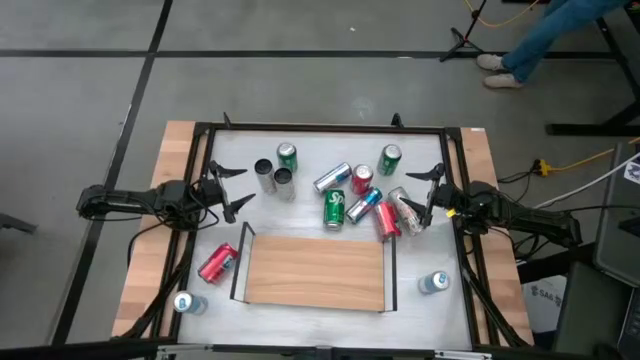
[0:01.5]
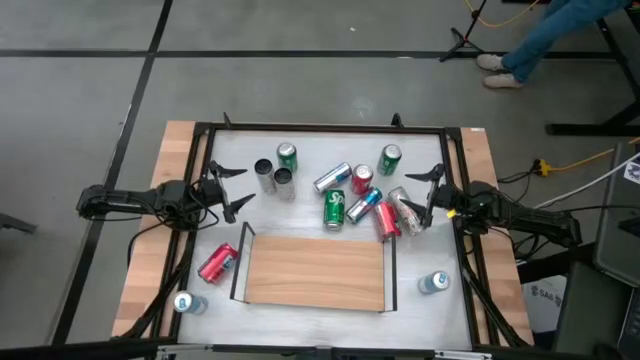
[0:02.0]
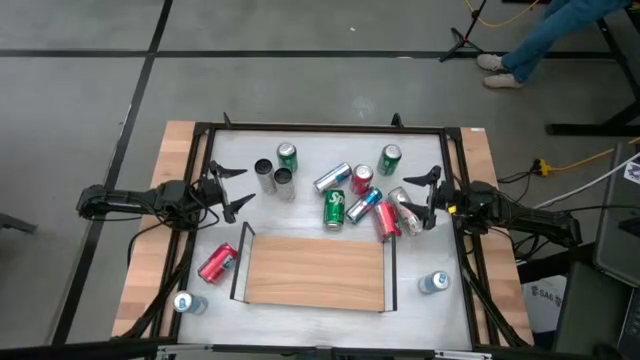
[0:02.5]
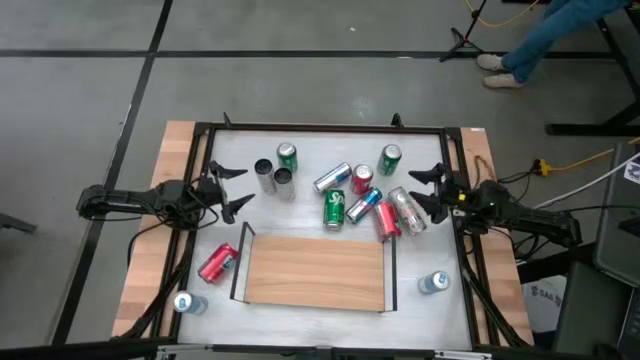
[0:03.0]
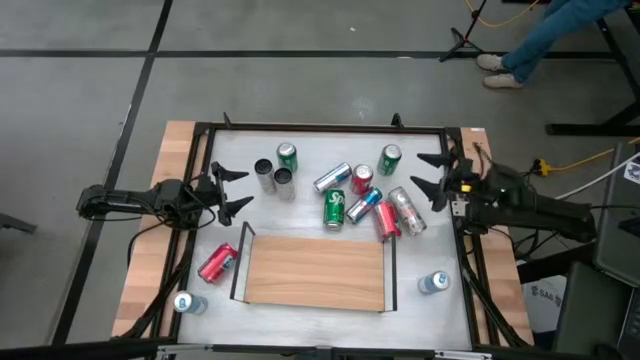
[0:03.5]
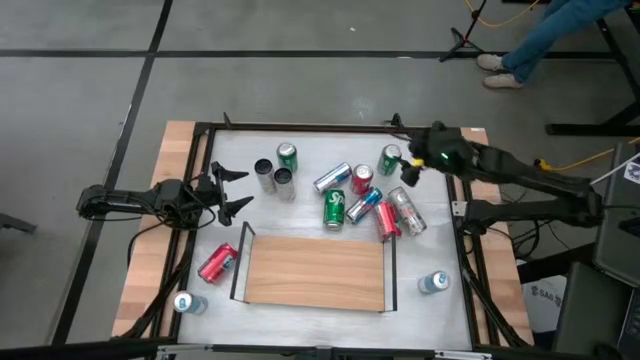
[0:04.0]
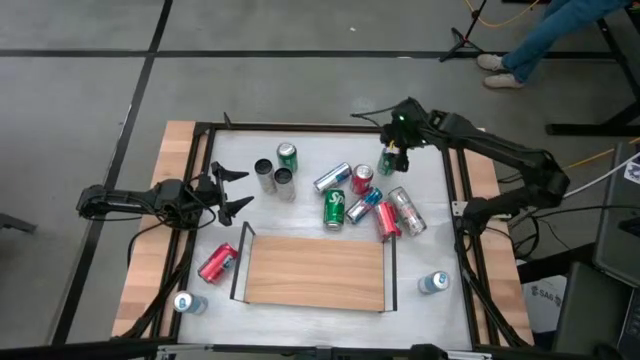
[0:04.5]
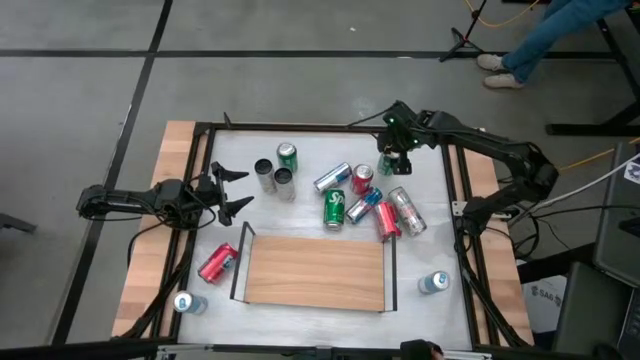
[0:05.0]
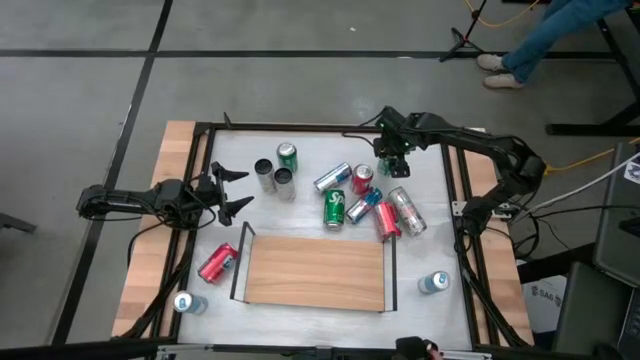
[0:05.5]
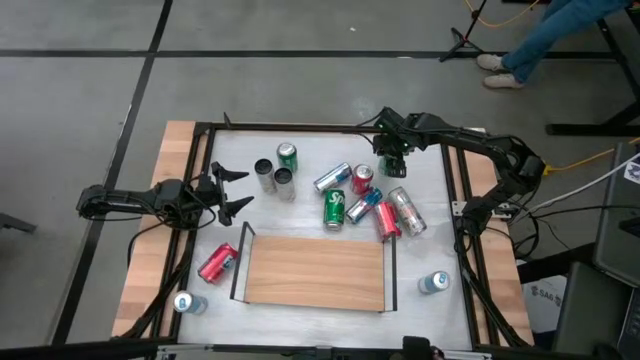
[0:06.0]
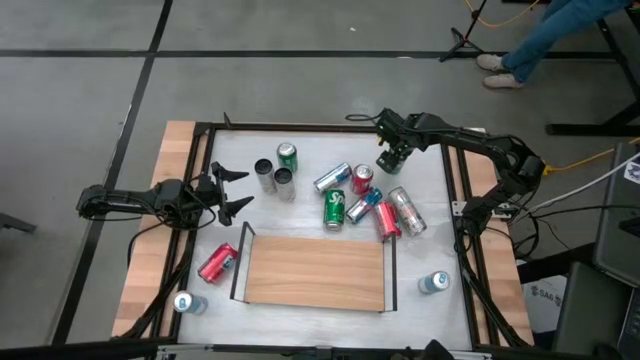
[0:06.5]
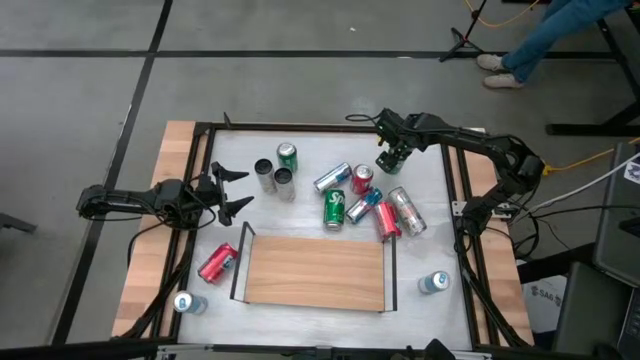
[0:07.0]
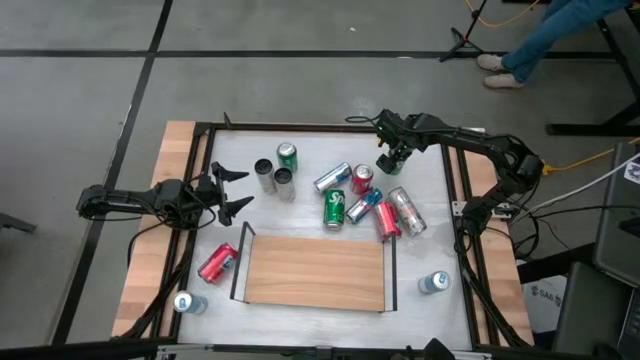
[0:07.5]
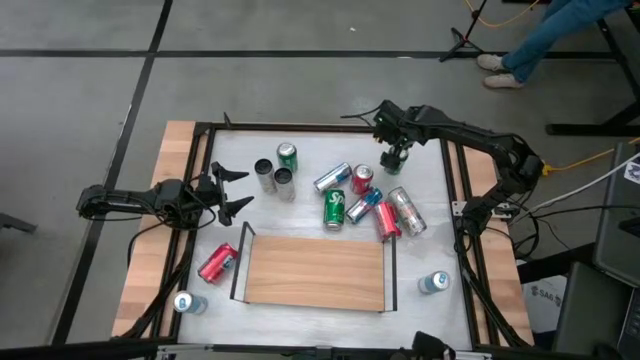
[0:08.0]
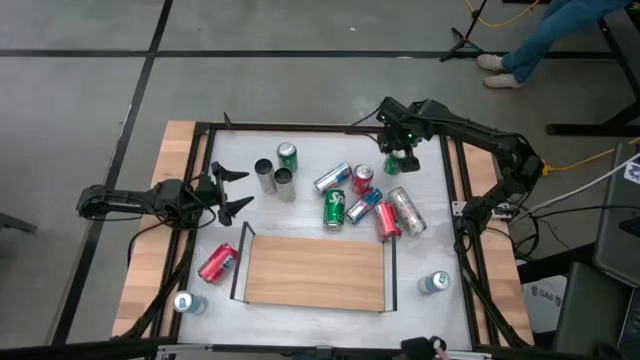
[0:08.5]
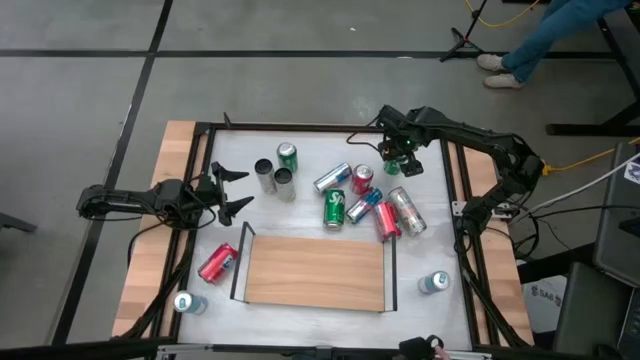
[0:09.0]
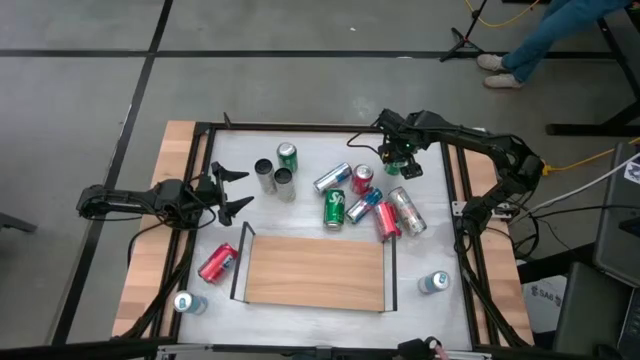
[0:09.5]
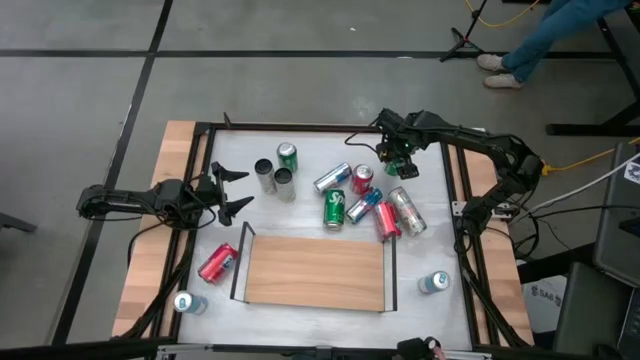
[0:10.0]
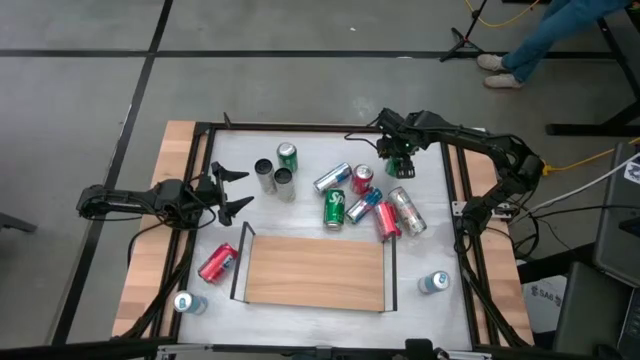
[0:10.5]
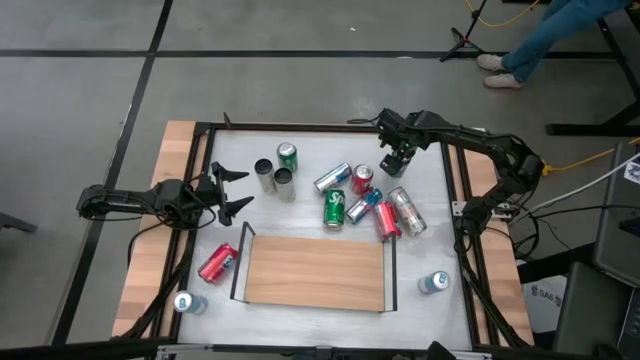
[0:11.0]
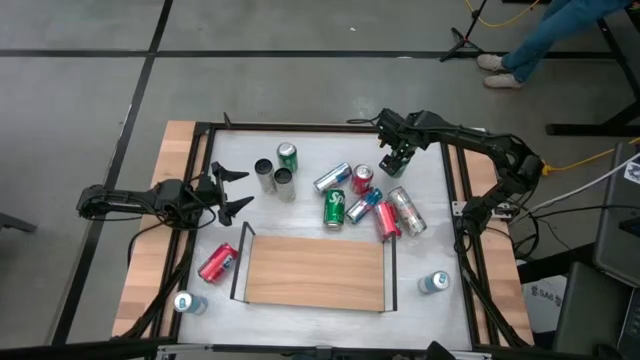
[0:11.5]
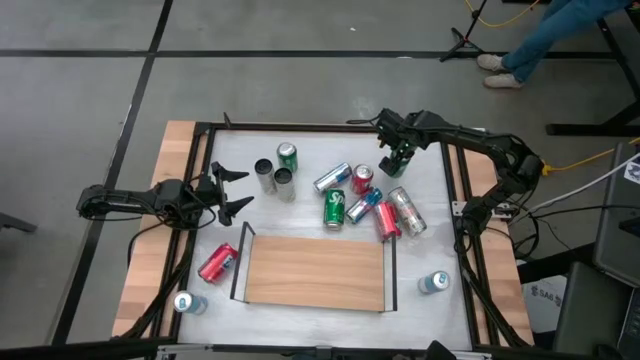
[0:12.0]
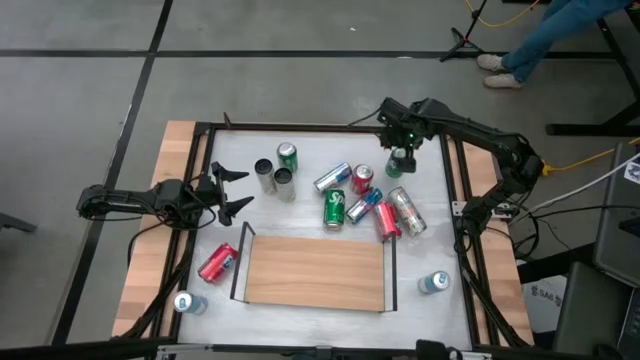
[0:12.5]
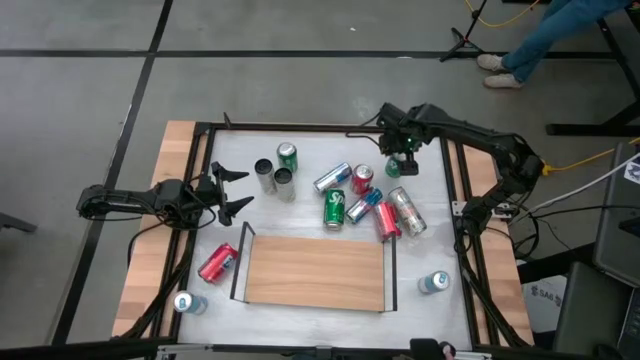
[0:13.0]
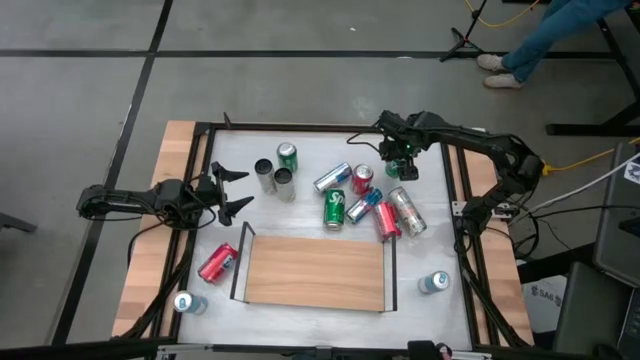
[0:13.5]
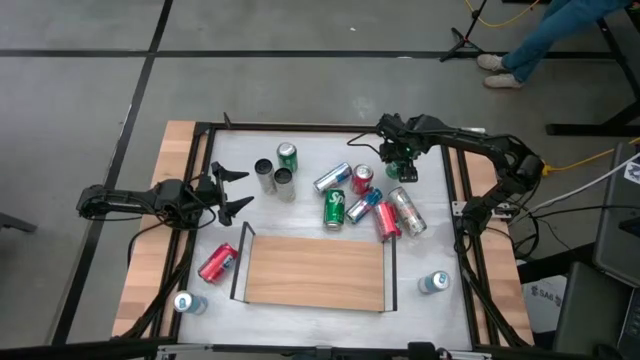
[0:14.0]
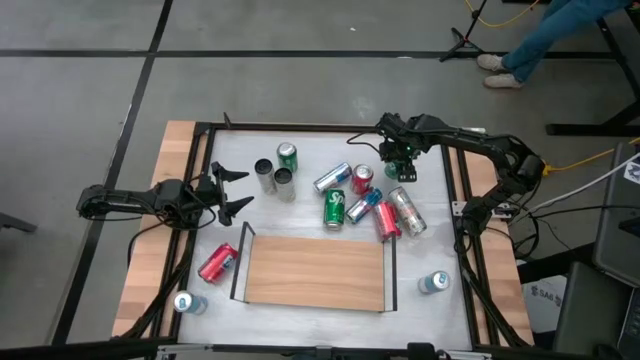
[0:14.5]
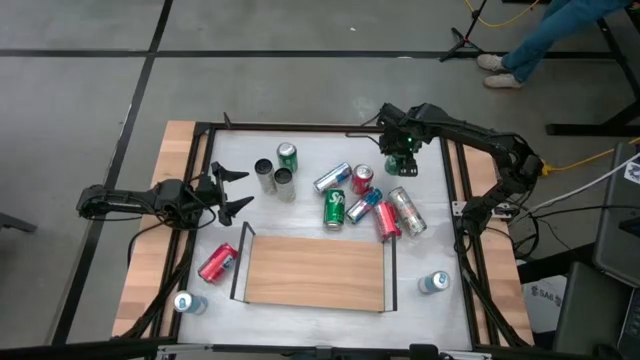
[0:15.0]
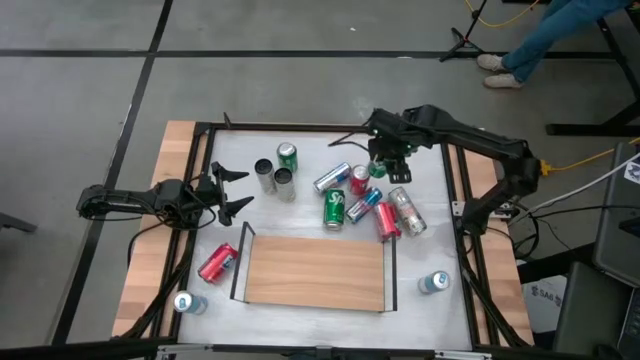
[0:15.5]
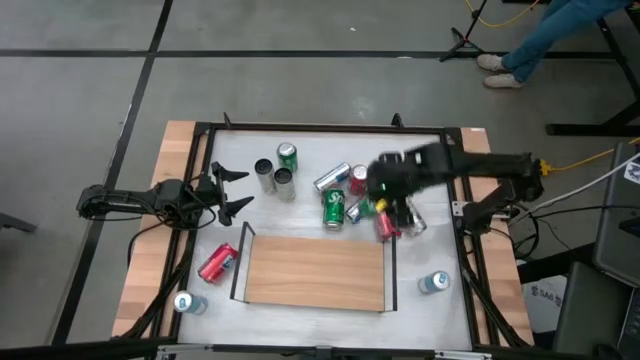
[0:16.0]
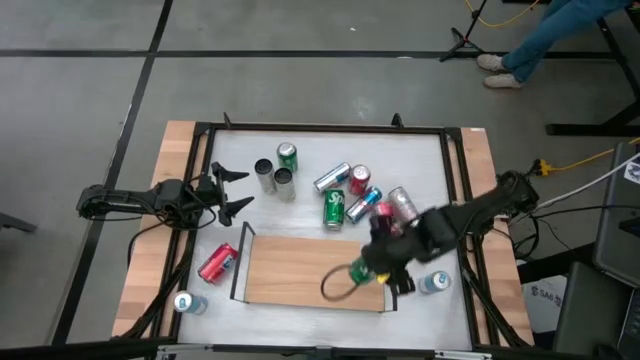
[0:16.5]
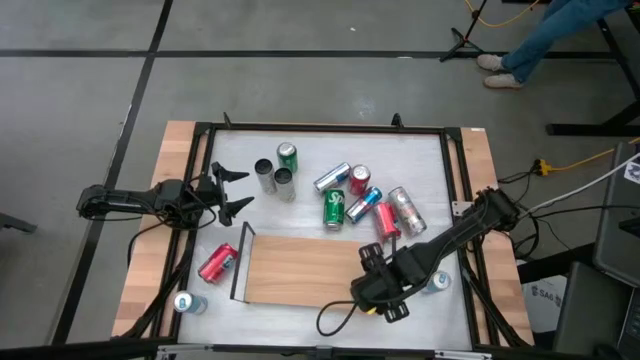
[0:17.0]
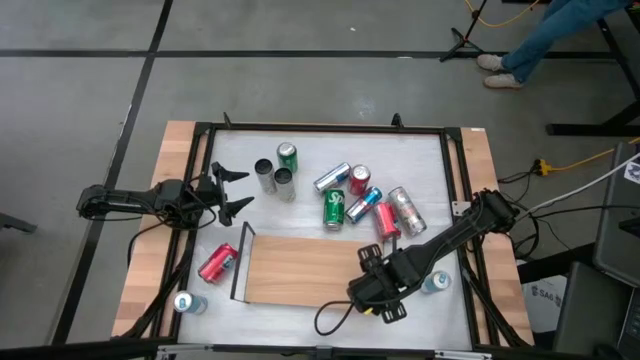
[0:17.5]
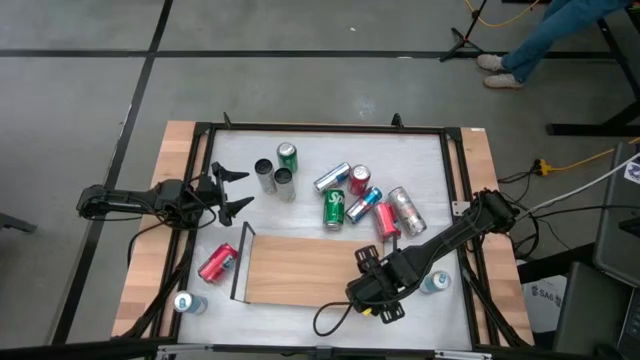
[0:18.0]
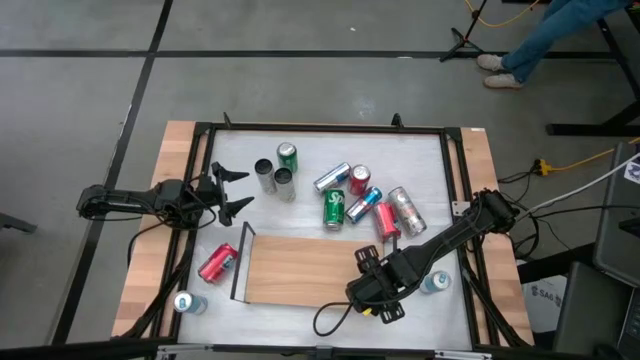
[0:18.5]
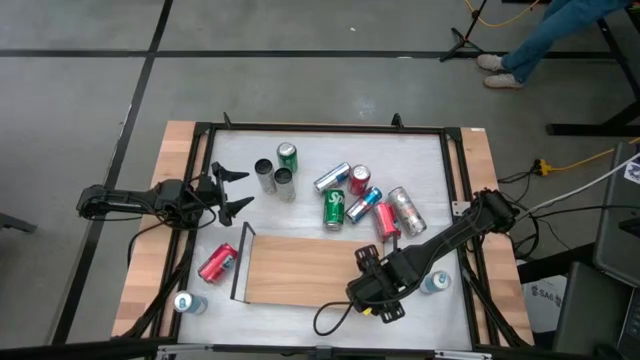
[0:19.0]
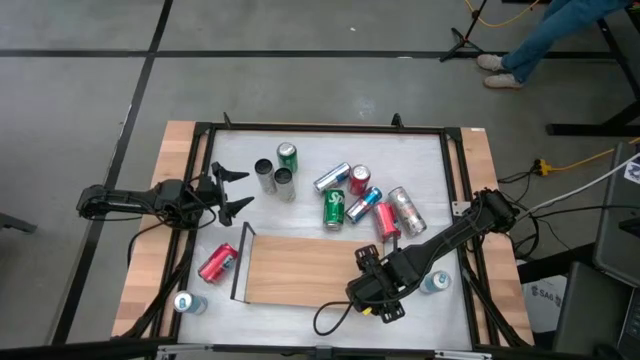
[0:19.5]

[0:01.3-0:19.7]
Task: Place canned beverage on shelf
Put the top right green soda can on the shelf

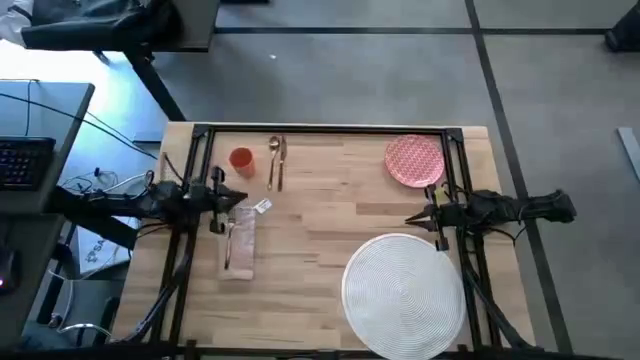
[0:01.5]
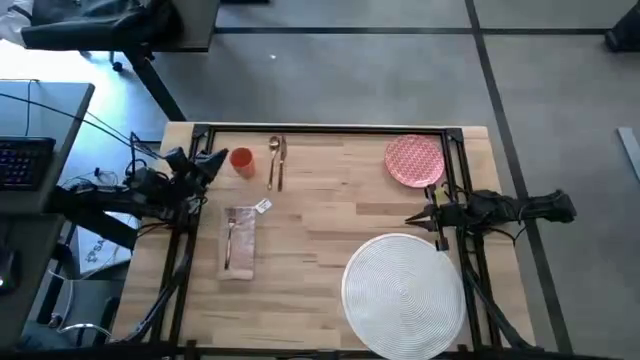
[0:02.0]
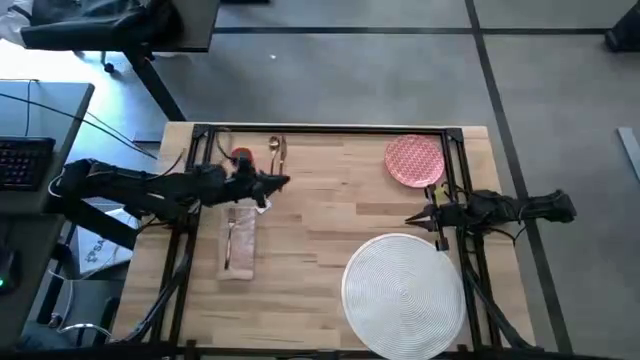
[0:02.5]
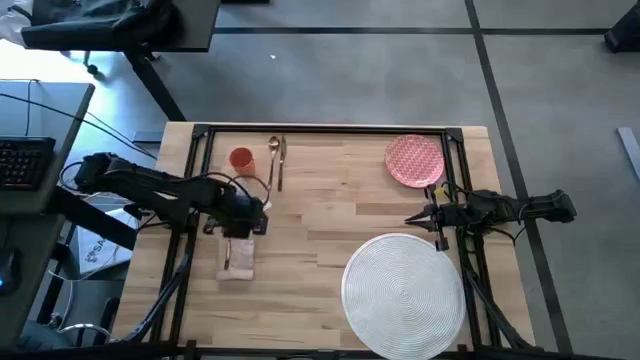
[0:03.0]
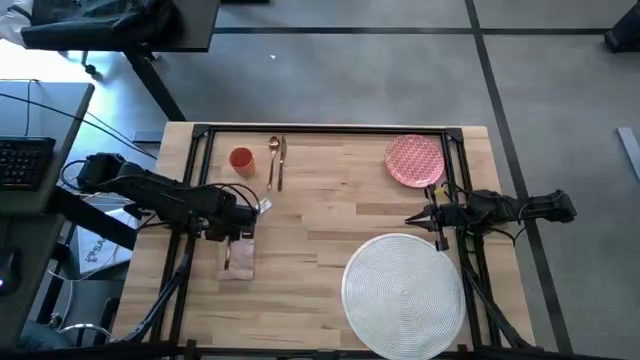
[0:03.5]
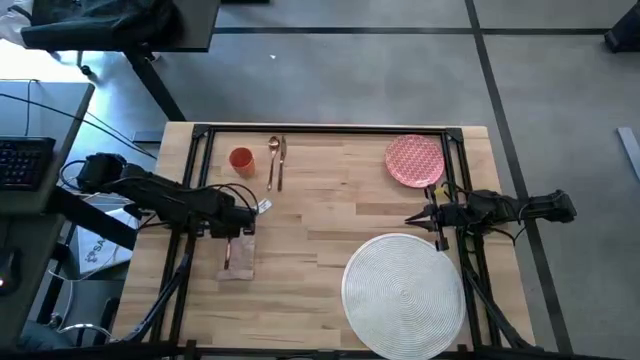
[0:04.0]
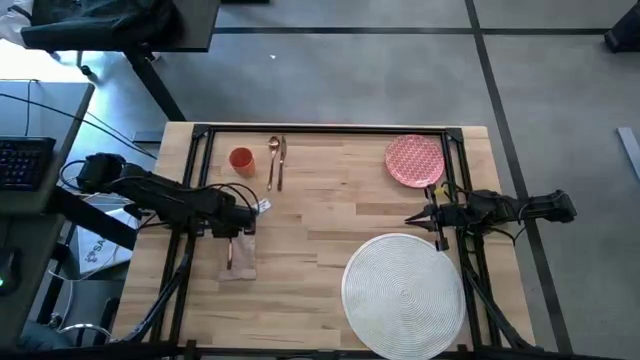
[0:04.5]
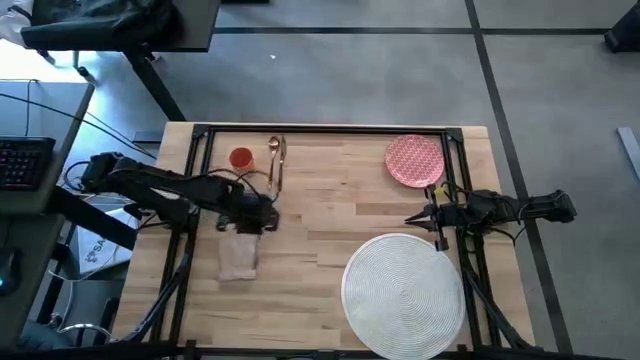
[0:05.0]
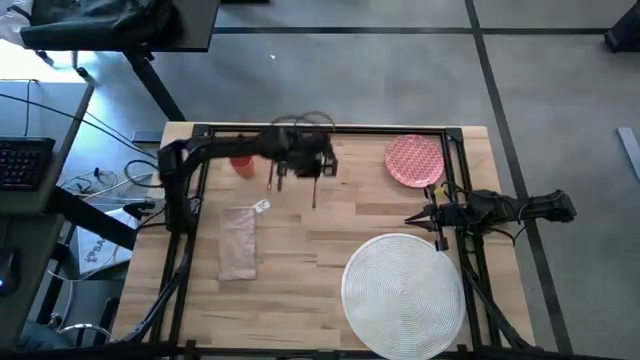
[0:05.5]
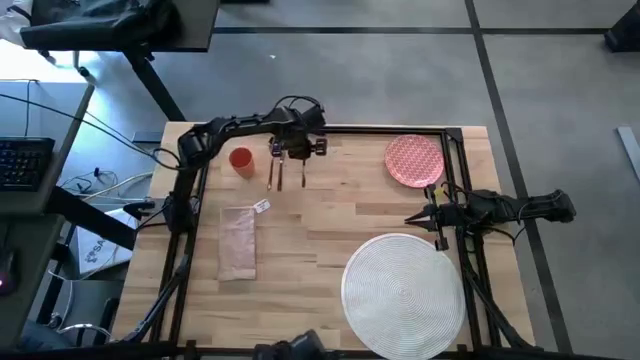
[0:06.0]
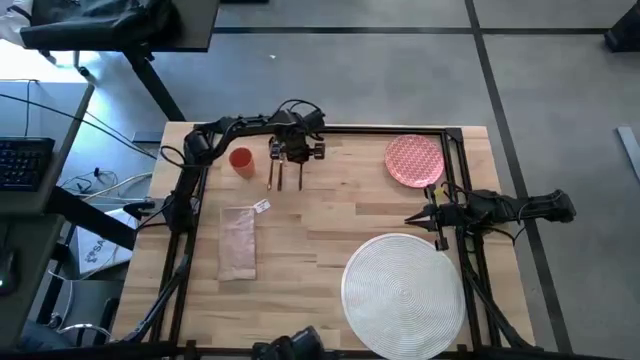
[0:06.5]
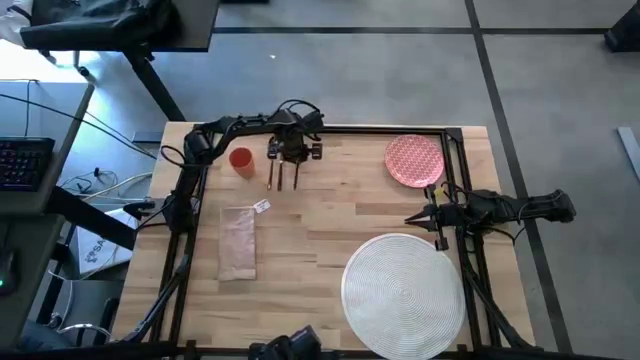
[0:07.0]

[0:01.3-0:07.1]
Task: Set table place
Adjust the gold fork
